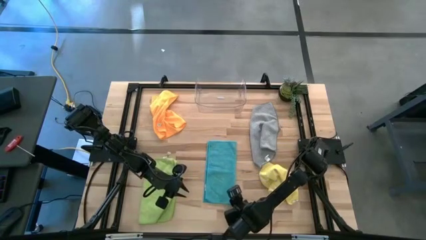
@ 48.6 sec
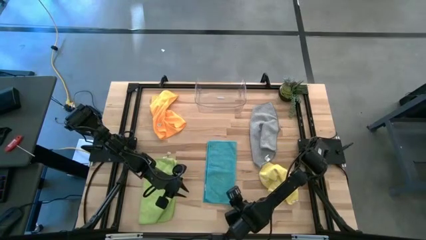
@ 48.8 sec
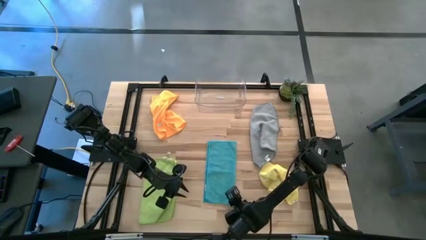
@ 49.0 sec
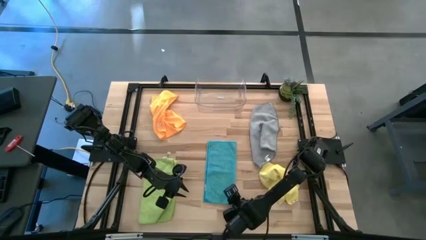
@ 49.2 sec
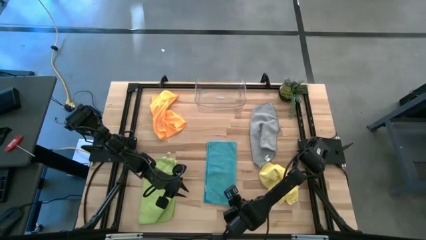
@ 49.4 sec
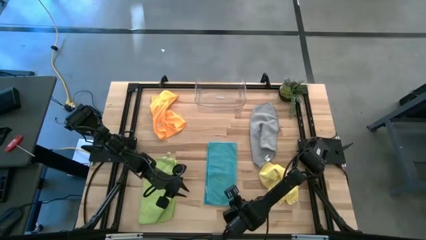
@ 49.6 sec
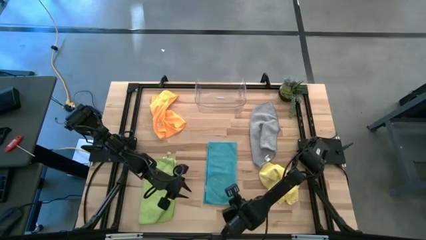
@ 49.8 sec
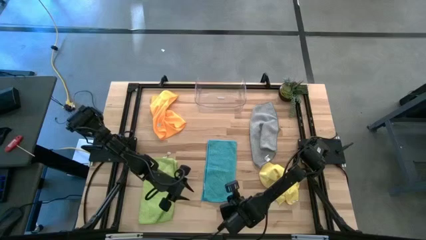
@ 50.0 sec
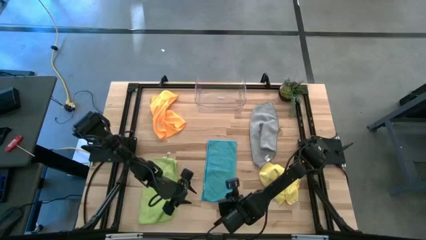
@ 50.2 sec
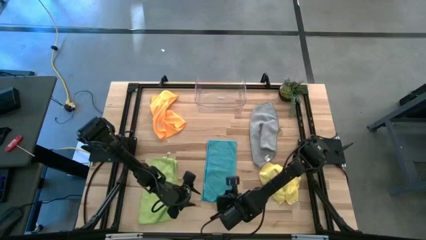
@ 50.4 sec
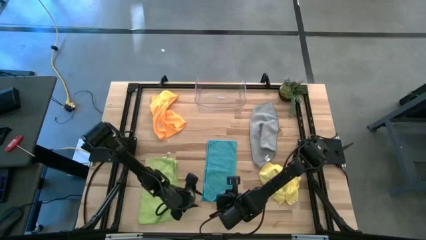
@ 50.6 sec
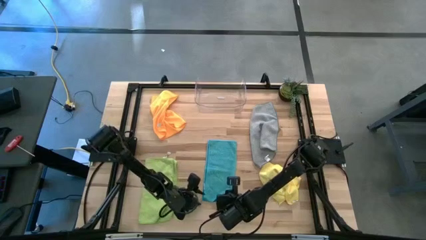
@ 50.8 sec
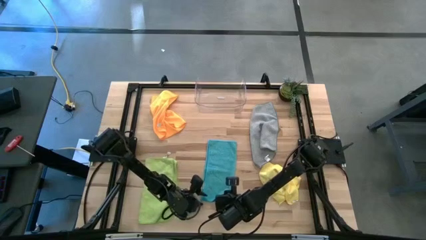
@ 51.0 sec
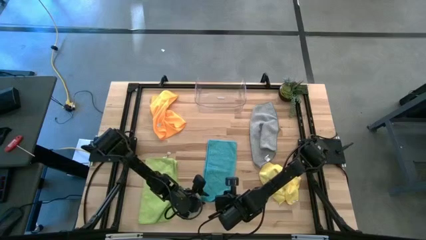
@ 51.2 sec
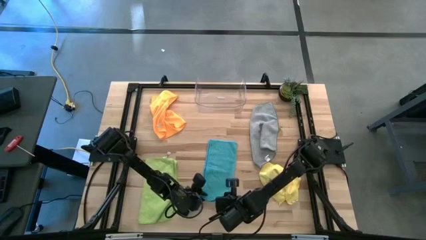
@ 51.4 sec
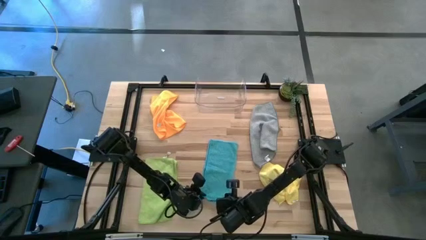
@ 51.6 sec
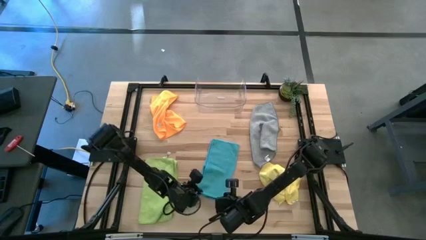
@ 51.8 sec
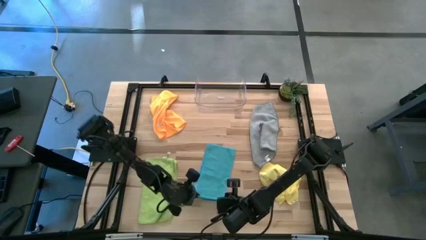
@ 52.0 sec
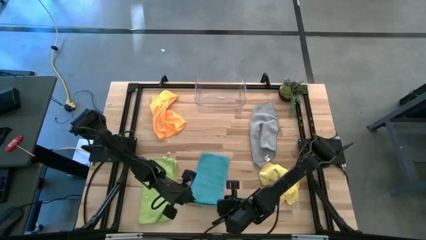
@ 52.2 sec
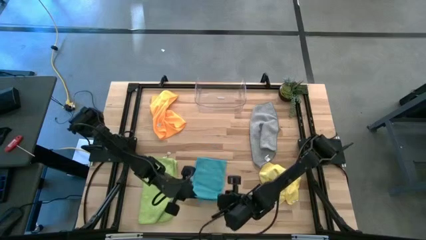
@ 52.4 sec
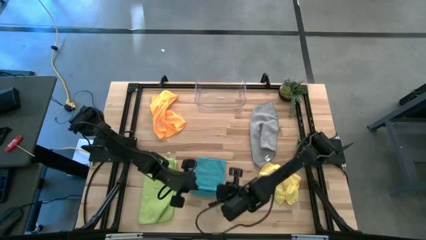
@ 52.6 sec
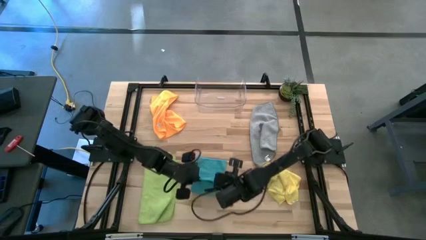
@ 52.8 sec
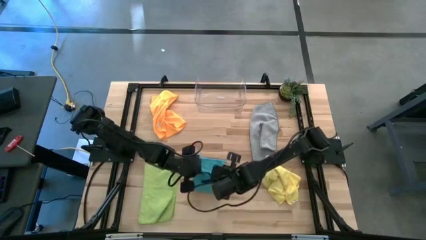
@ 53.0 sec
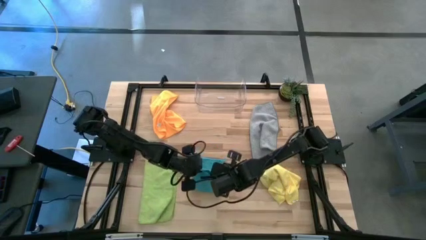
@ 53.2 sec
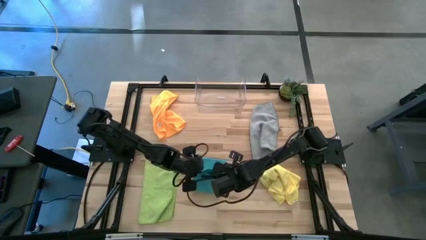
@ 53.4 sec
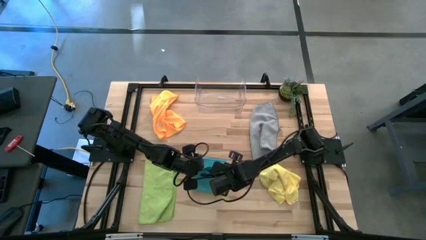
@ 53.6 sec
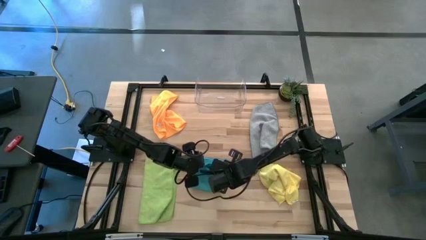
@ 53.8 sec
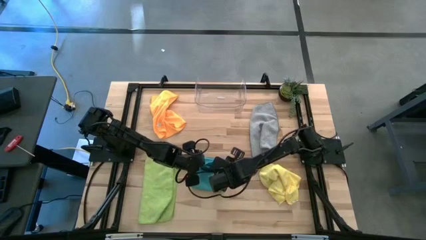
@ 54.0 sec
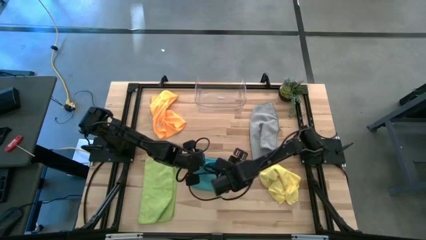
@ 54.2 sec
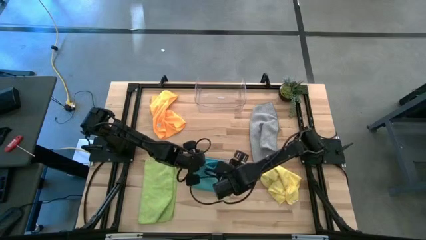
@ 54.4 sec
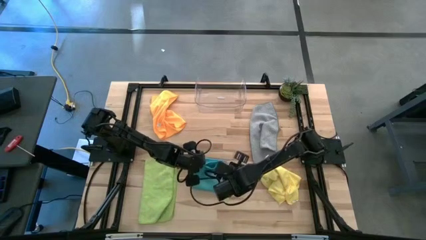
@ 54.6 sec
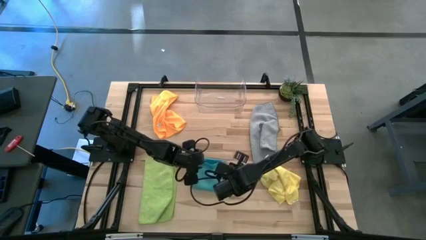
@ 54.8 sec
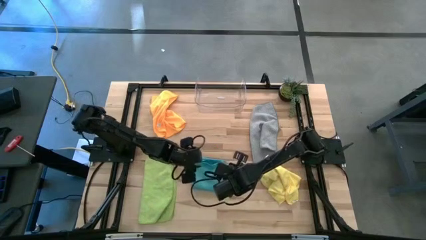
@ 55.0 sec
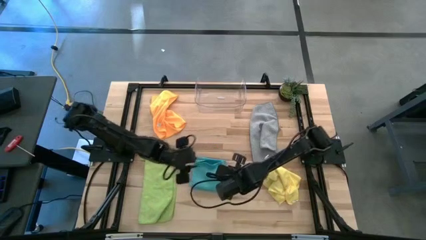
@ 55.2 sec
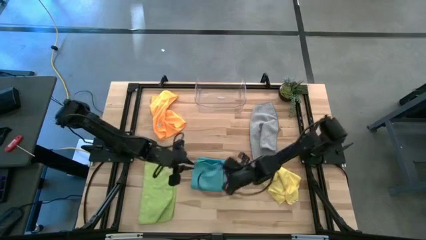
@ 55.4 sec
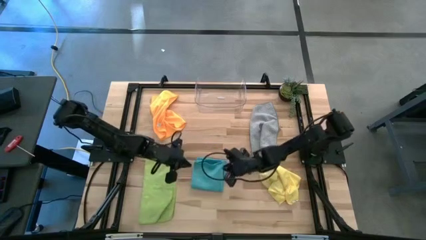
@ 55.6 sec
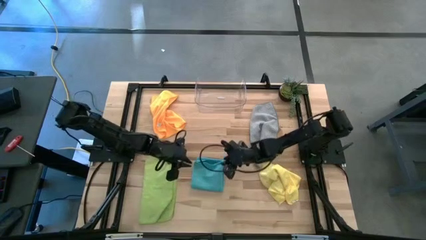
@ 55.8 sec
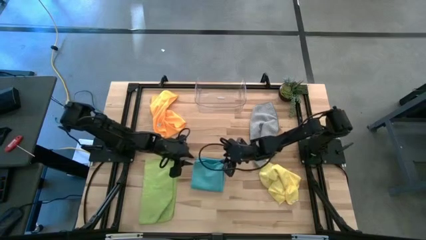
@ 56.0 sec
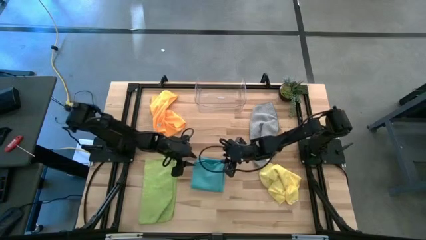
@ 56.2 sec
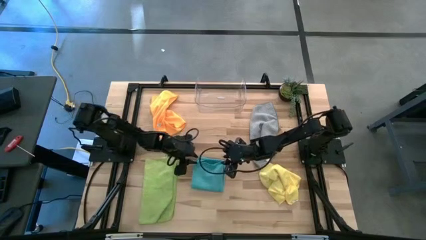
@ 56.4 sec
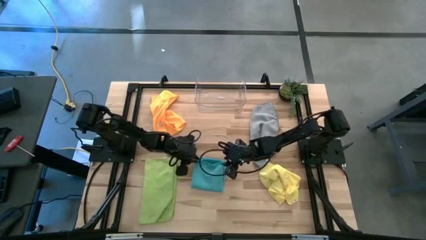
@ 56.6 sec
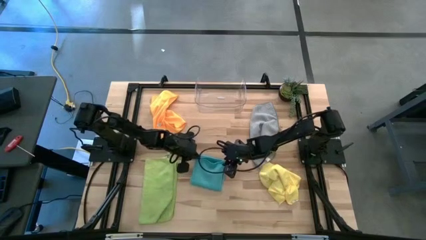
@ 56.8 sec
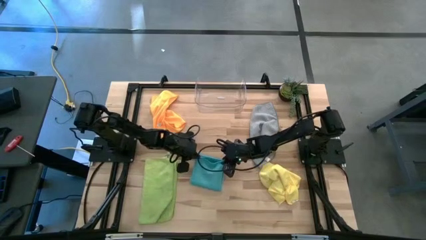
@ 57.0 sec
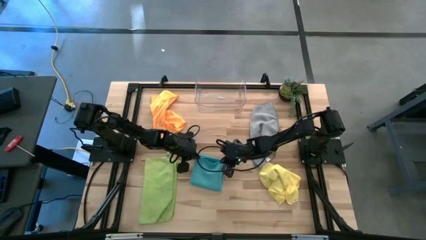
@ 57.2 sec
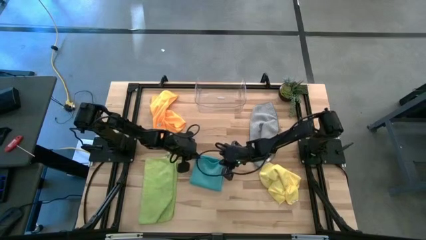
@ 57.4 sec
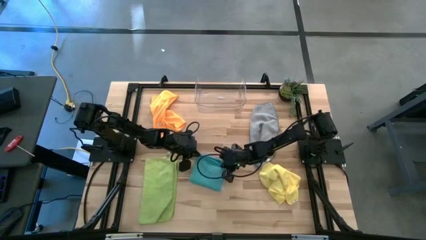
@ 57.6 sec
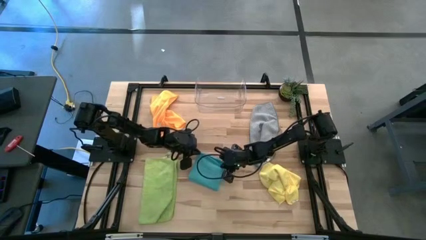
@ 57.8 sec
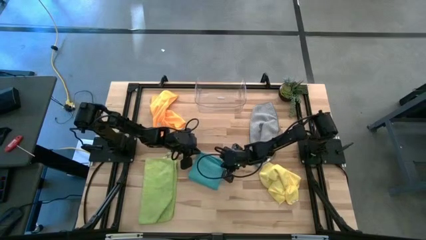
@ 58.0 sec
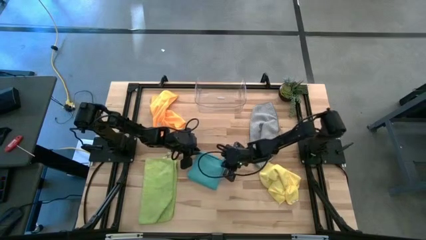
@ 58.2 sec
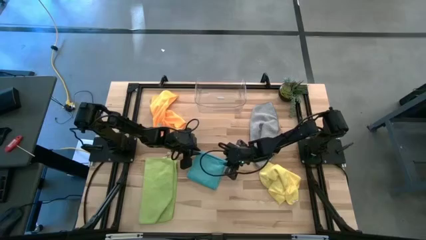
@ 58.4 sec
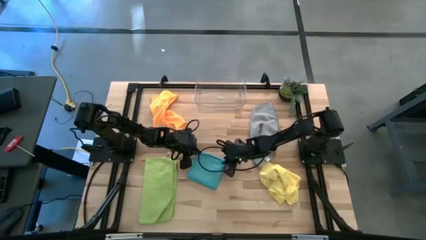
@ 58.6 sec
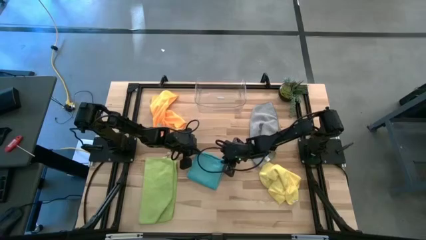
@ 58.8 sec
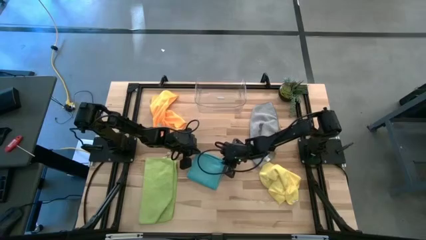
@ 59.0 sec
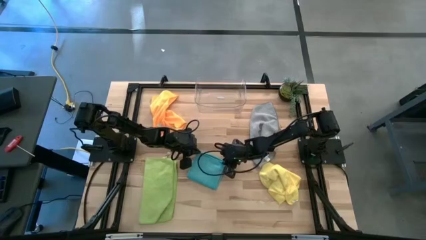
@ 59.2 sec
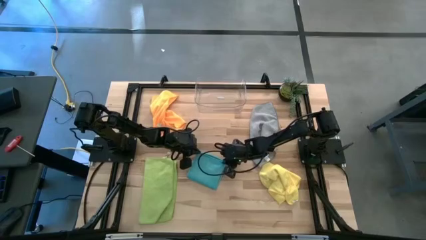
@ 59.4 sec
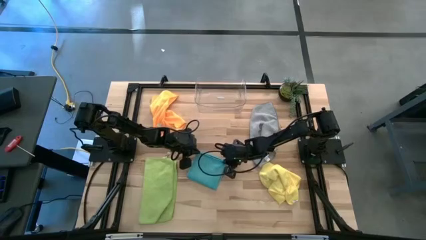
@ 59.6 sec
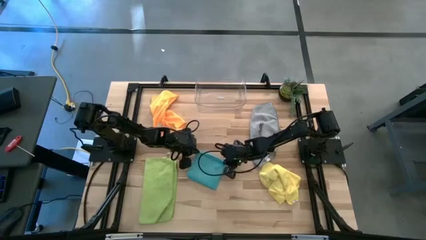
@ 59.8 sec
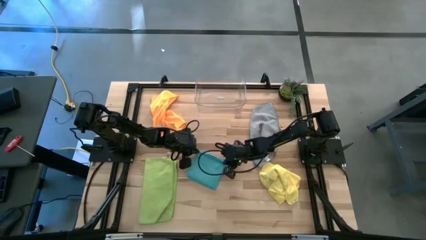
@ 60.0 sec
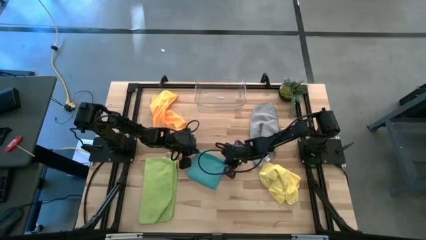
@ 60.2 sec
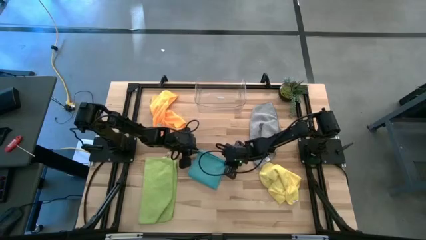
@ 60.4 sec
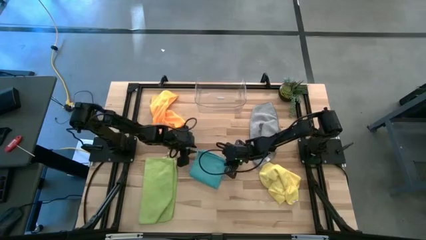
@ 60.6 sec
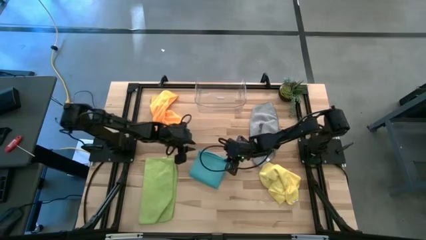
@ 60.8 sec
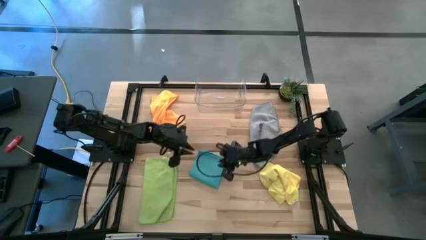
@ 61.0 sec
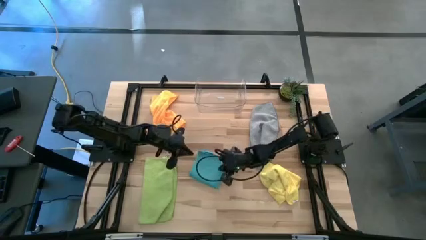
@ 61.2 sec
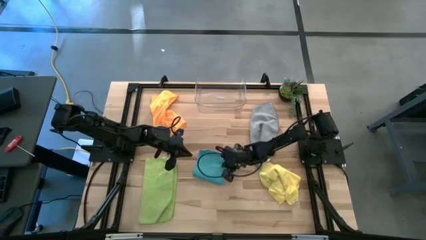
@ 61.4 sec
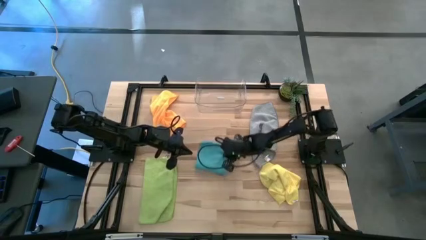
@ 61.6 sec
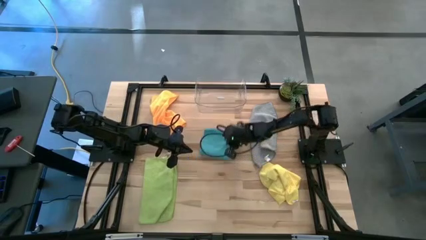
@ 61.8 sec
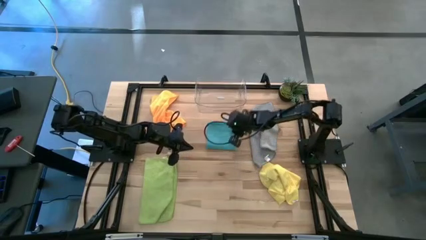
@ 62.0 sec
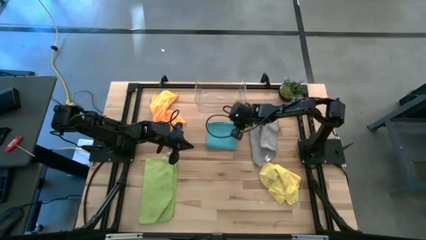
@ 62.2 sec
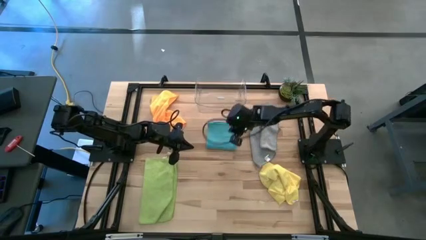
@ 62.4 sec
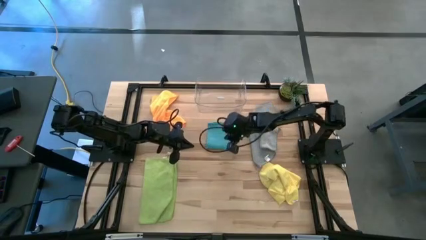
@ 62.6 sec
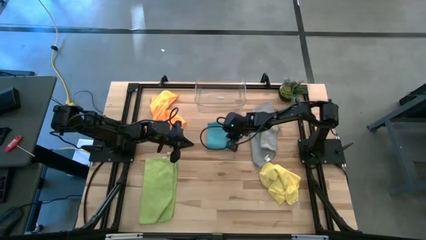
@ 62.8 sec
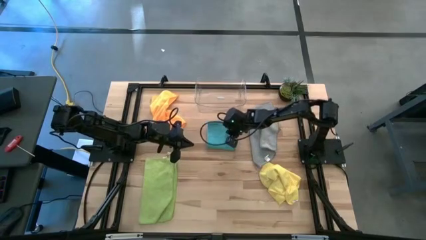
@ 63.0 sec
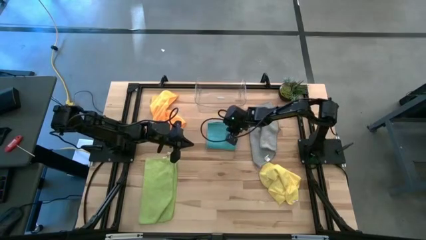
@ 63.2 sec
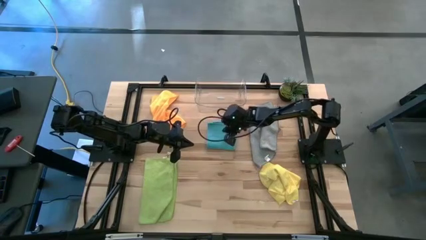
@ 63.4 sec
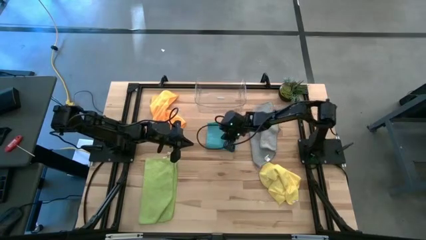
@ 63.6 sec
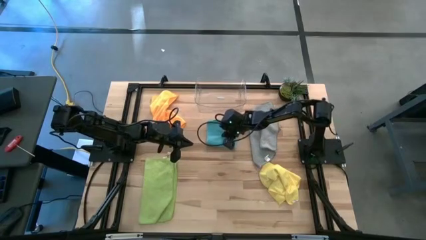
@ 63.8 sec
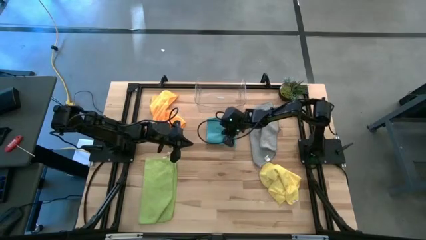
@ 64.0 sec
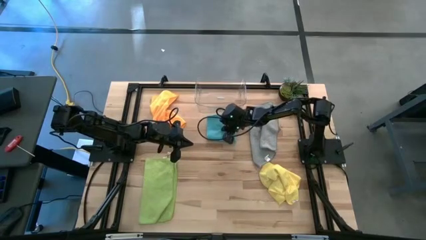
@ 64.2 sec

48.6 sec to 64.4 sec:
Task: Fold microfiber towels
Fold the blue towel on the table
